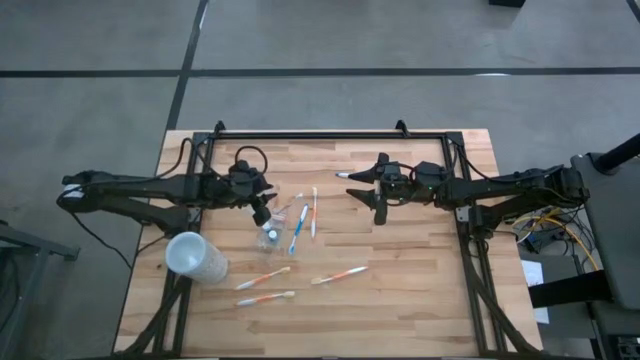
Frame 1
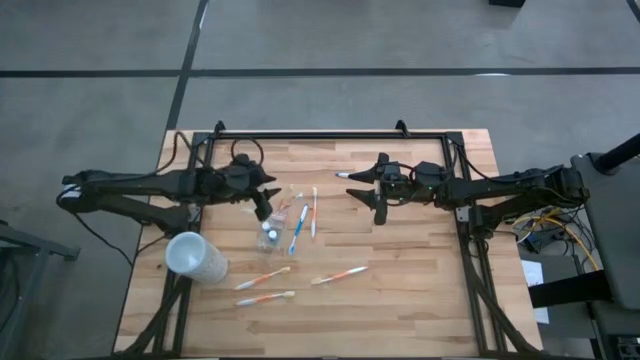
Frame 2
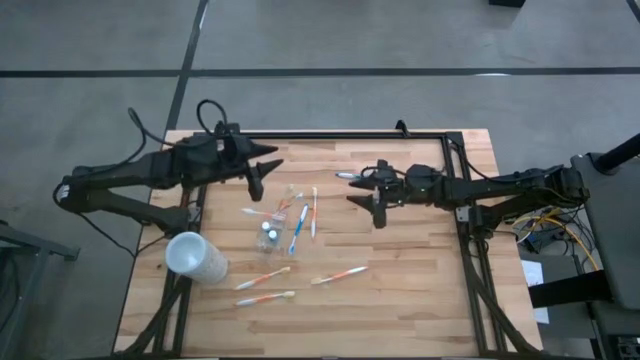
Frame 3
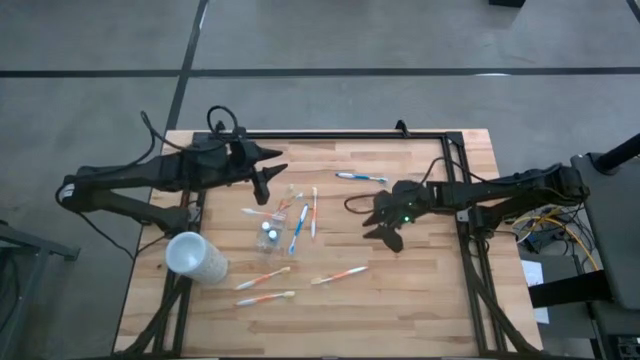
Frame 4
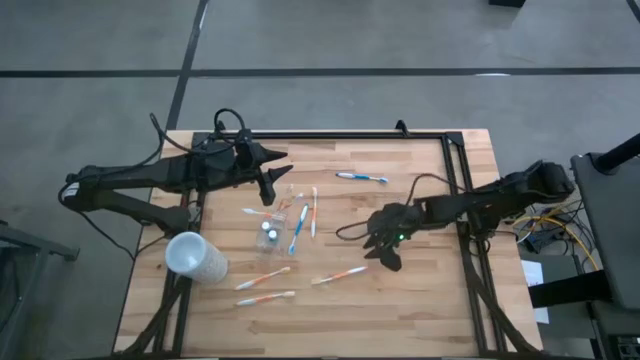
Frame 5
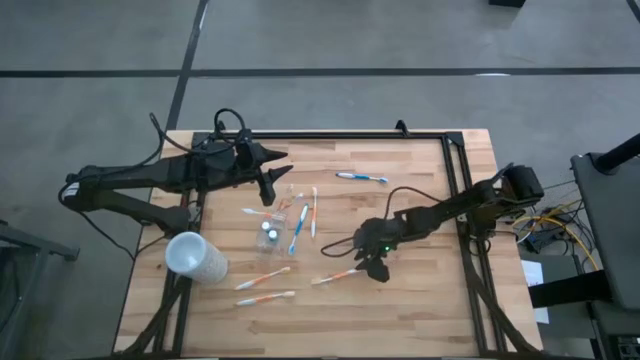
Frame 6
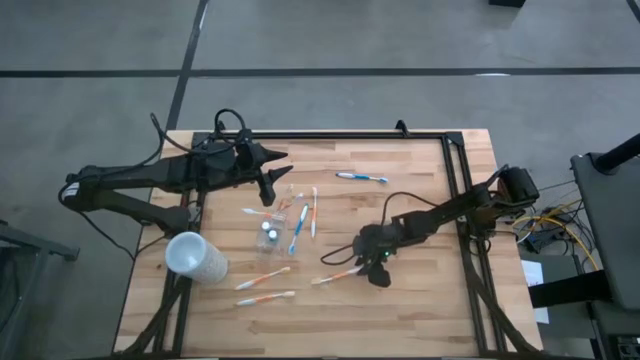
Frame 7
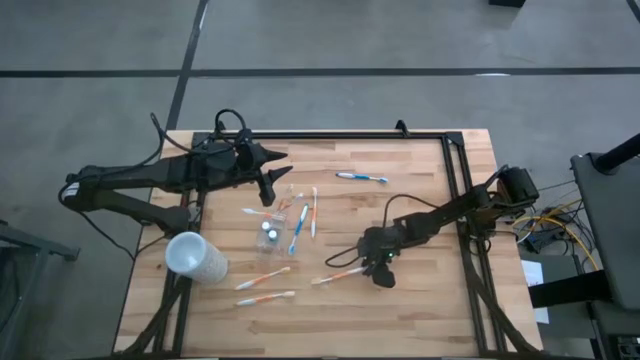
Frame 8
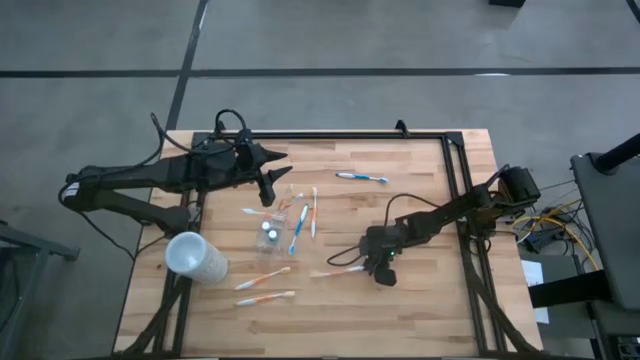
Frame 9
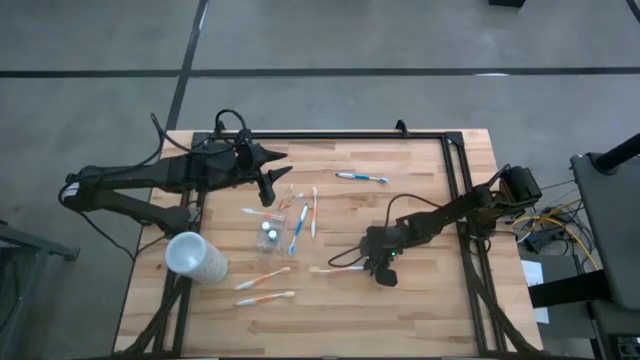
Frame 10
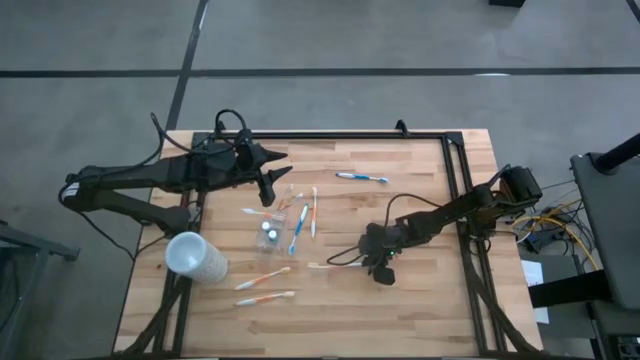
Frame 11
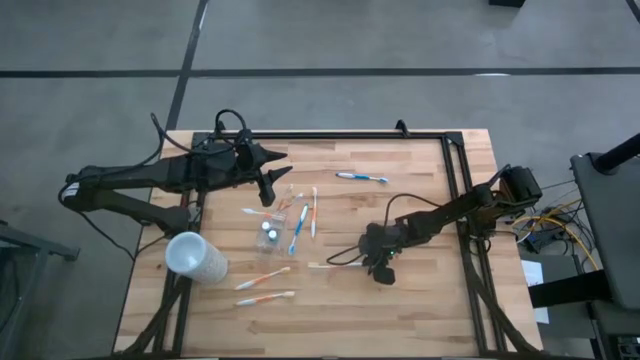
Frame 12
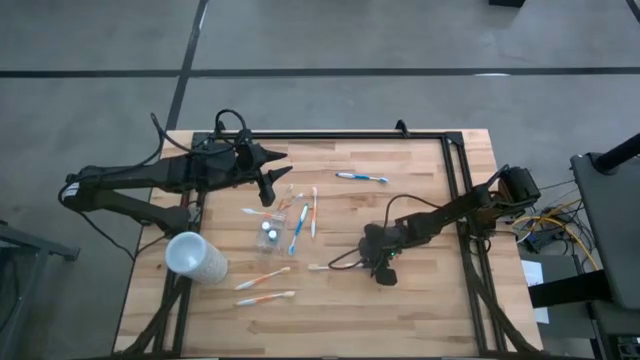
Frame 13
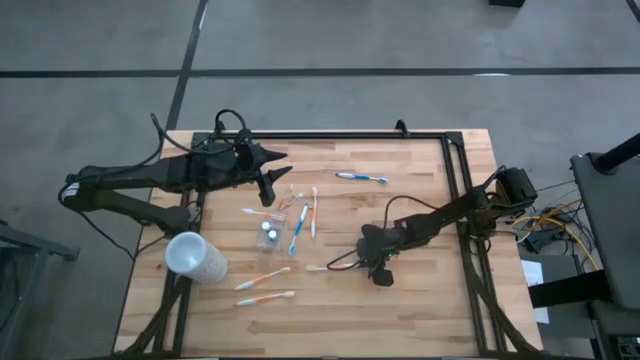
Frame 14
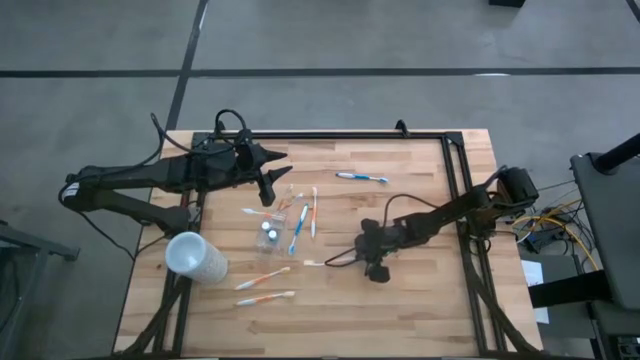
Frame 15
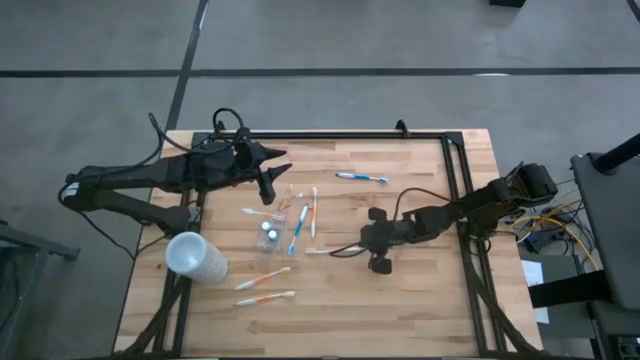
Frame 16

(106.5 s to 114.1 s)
Task: Pick & Place toothbrushing station
Put the orange toothbrush into the transparent organizer

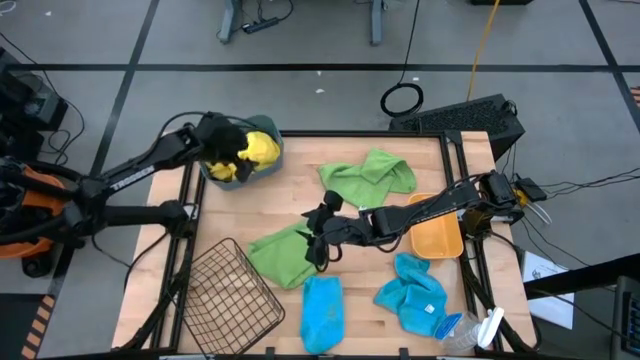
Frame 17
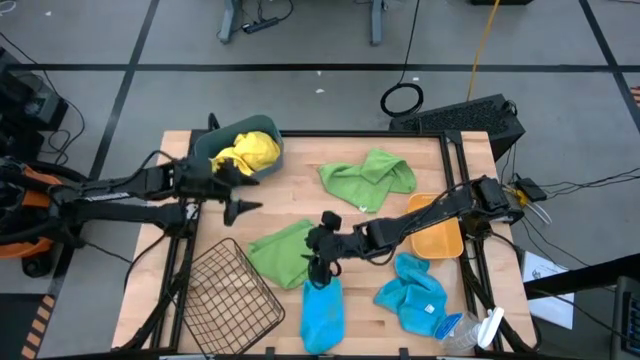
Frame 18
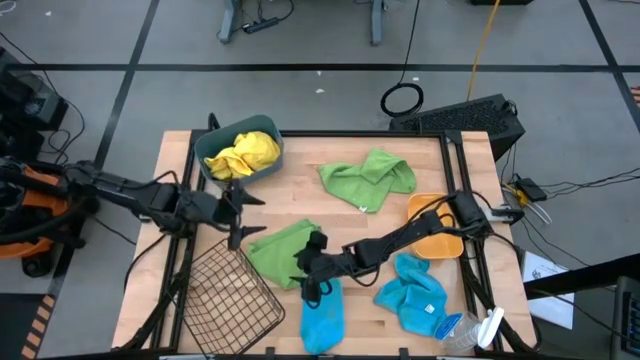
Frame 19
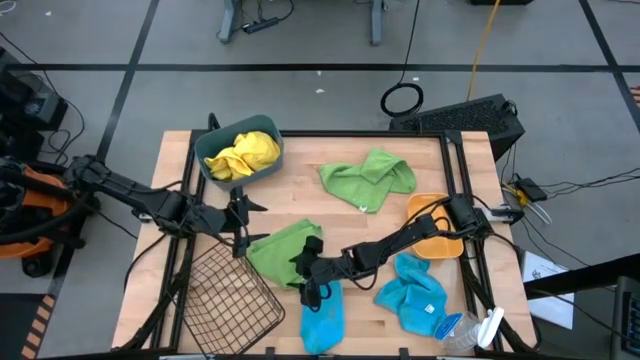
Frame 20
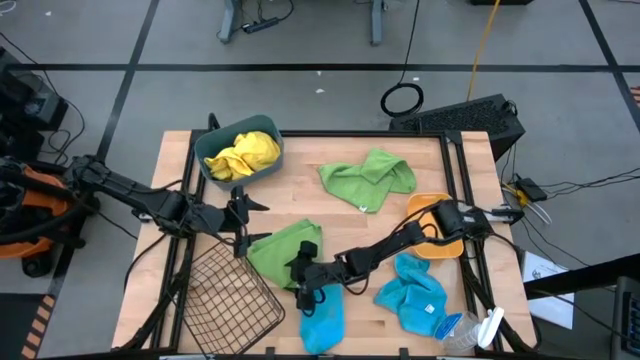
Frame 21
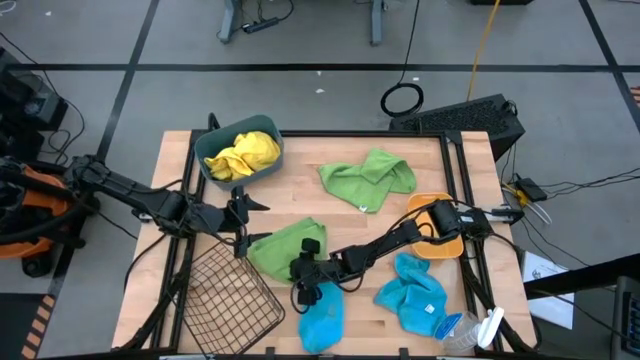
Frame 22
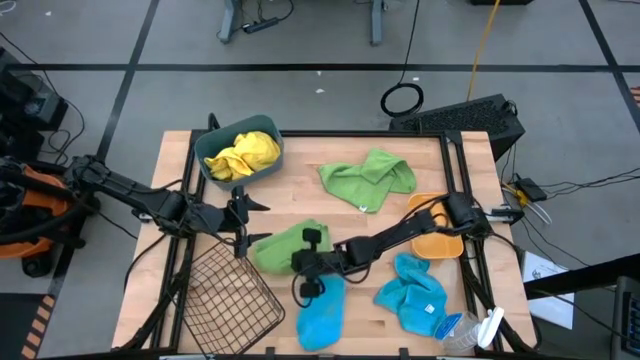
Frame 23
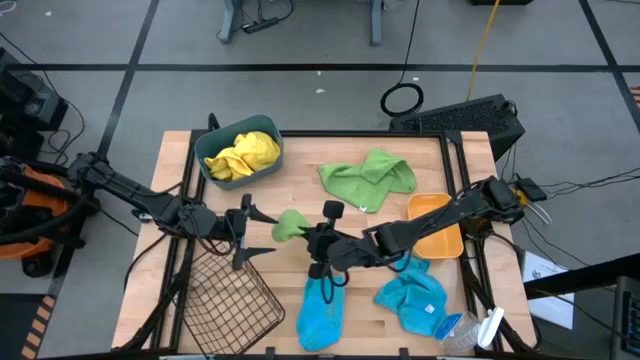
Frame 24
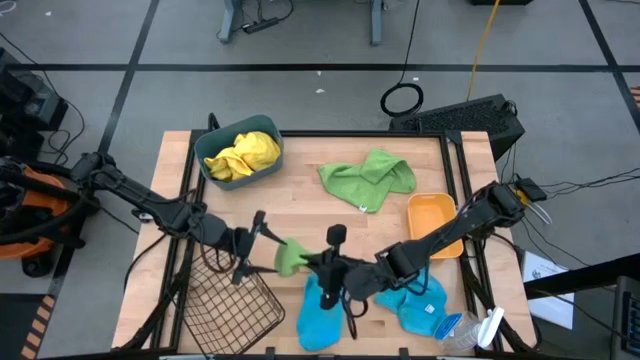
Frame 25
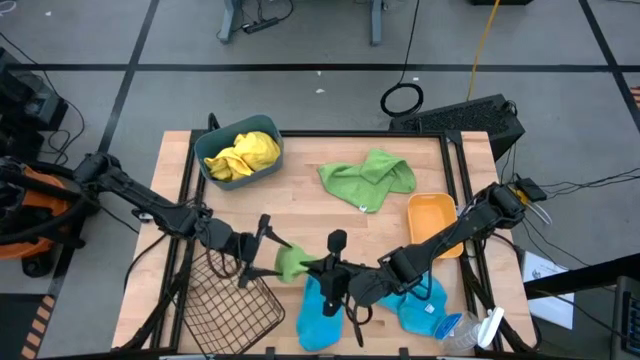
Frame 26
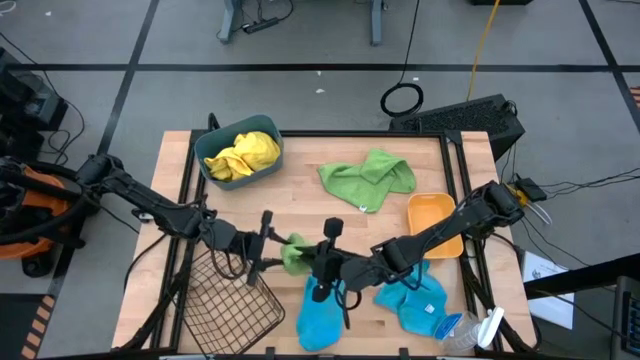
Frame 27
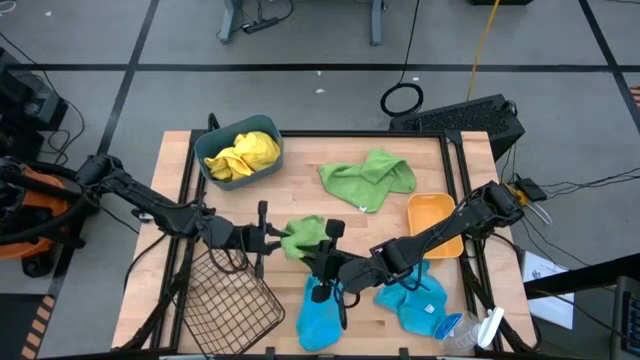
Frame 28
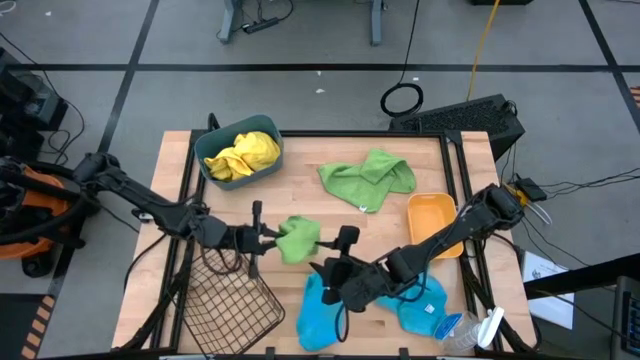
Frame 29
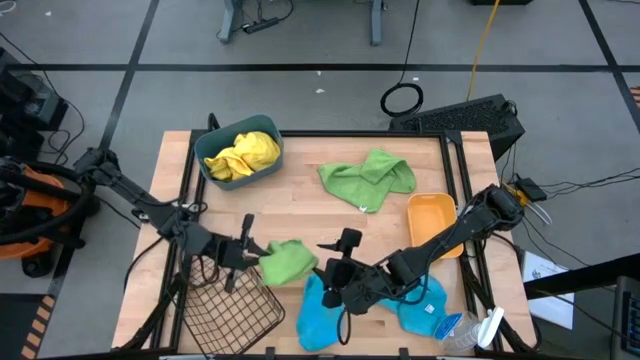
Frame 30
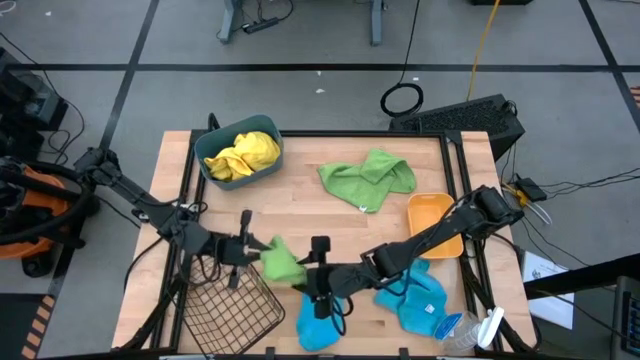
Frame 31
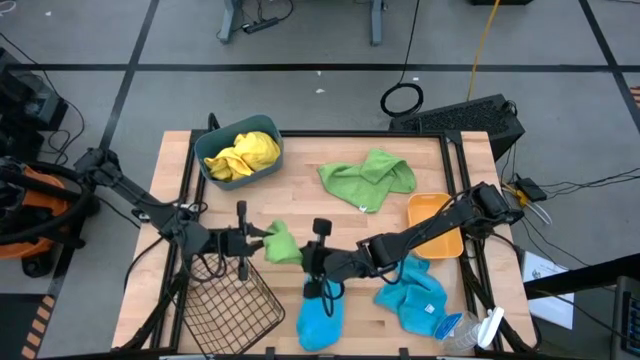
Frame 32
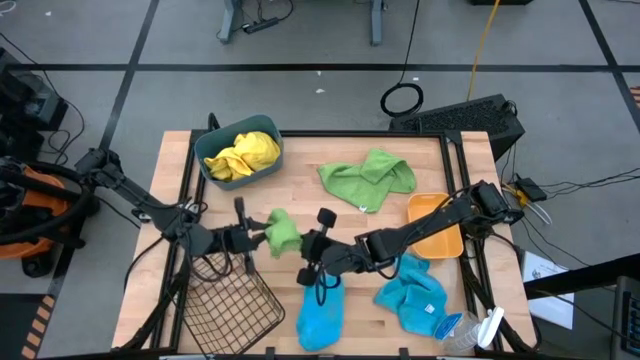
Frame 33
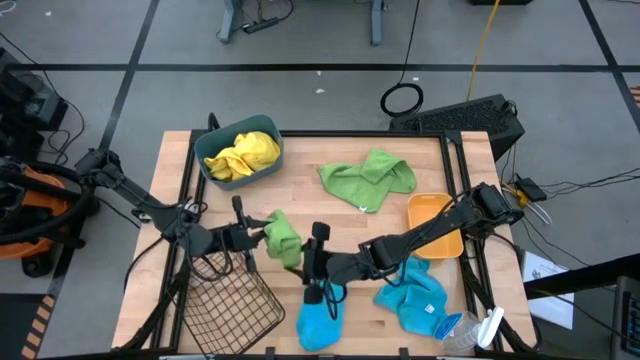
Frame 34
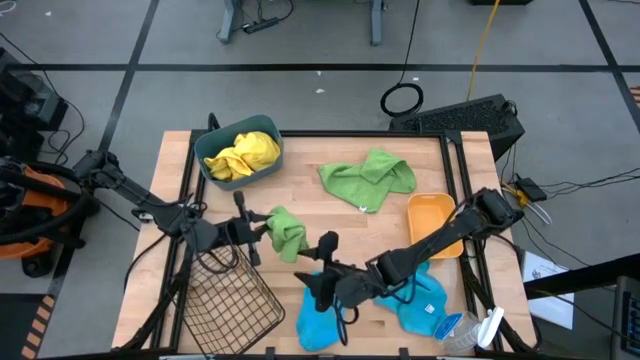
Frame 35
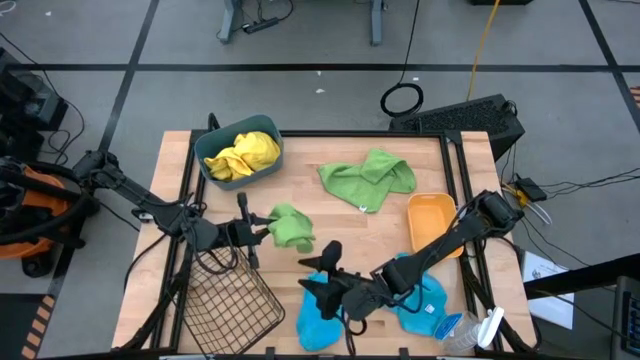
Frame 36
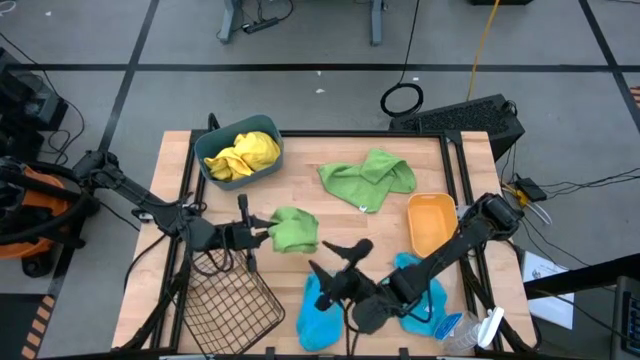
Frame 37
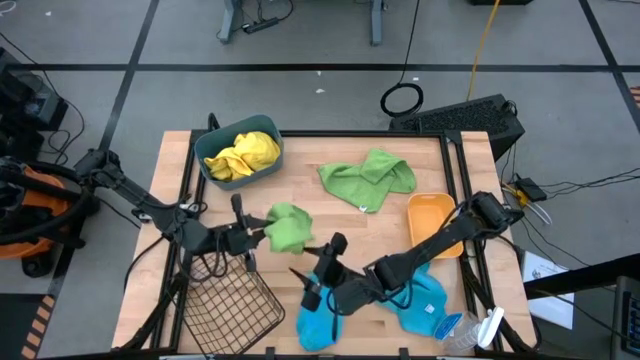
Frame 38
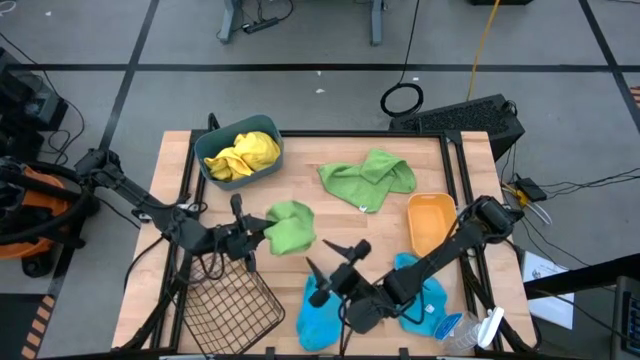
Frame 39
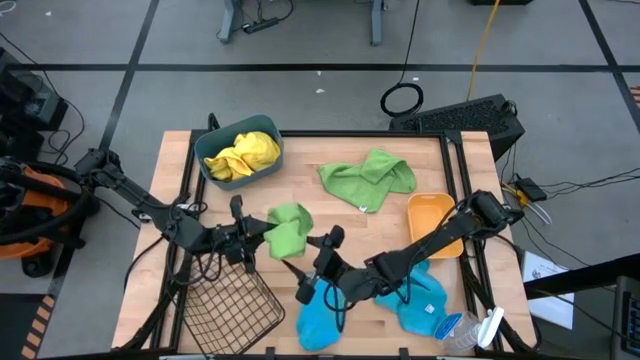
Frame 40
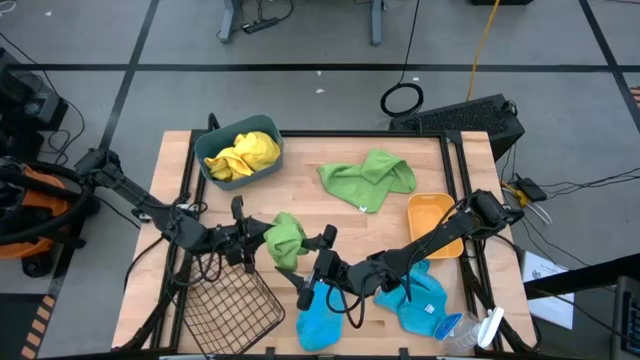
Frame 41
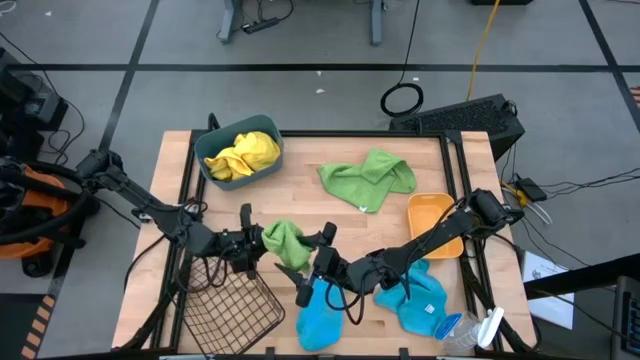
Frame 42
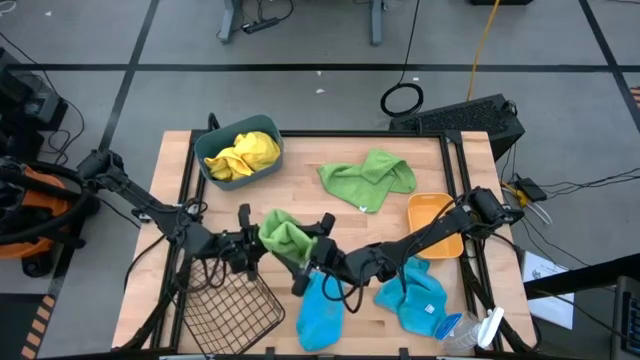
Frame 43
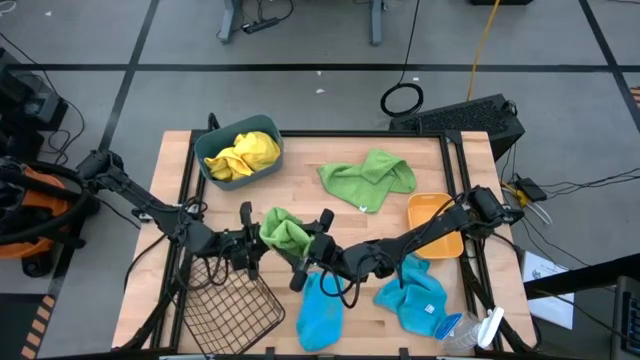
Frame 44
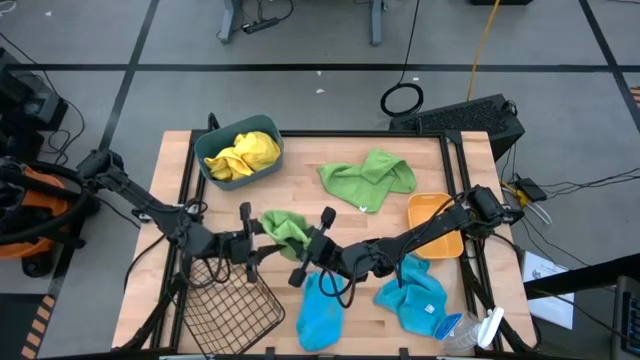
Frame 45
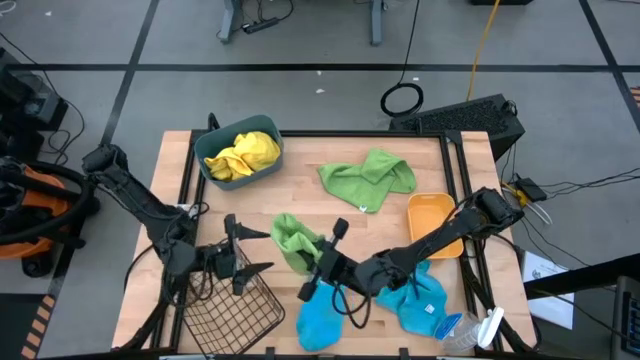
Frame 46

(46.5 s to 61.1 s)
Task: Sort microfiber towel by color & place in baskets
Roll lower left green towel
